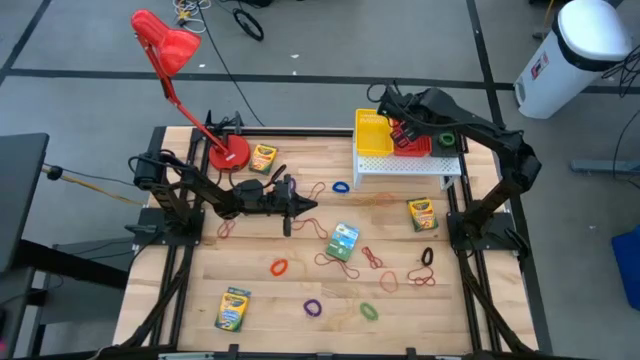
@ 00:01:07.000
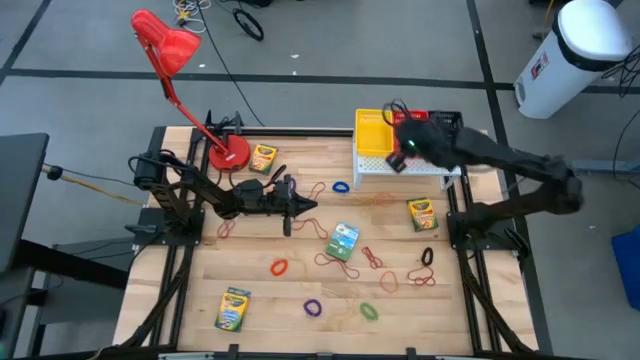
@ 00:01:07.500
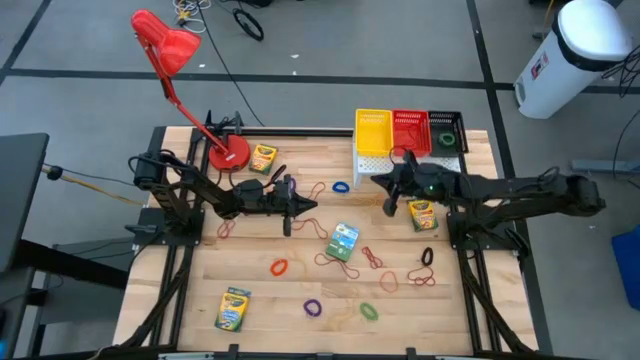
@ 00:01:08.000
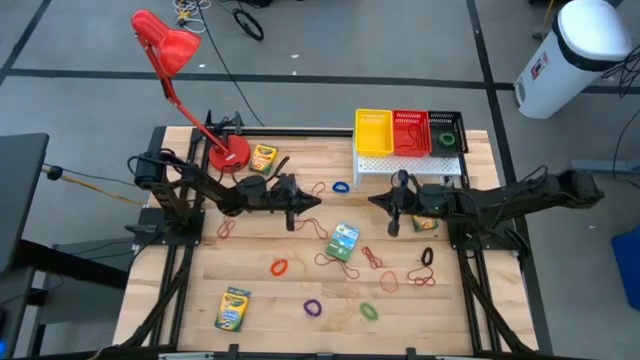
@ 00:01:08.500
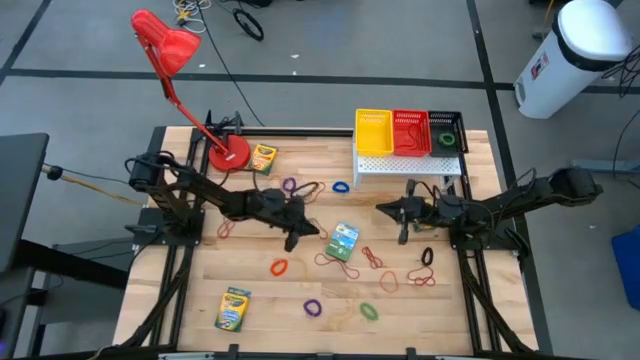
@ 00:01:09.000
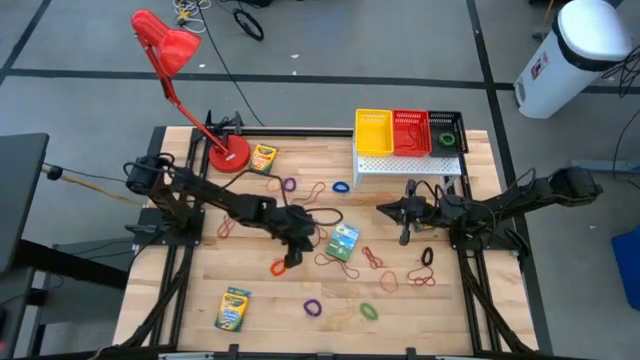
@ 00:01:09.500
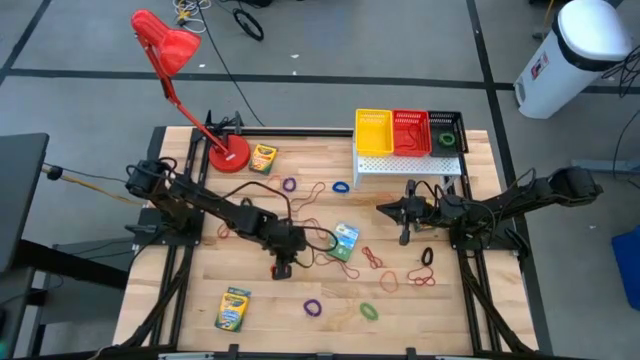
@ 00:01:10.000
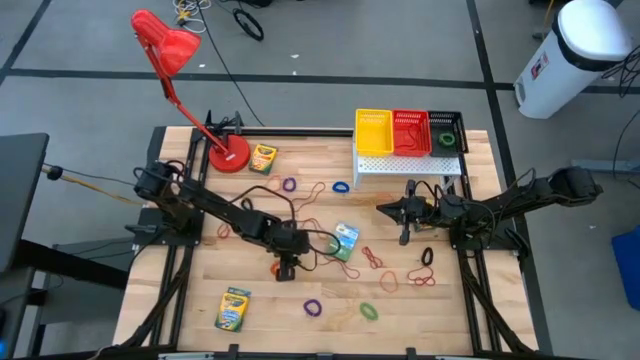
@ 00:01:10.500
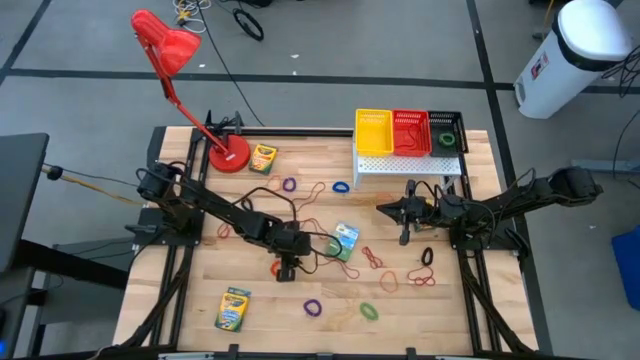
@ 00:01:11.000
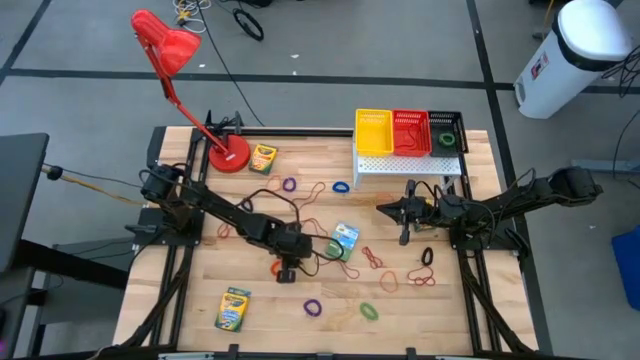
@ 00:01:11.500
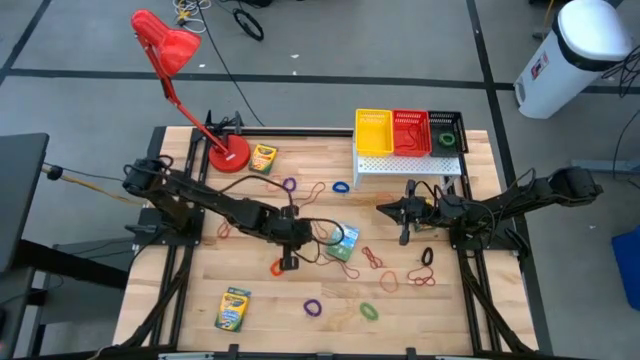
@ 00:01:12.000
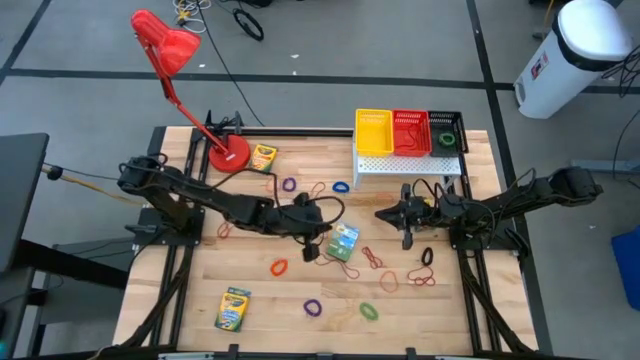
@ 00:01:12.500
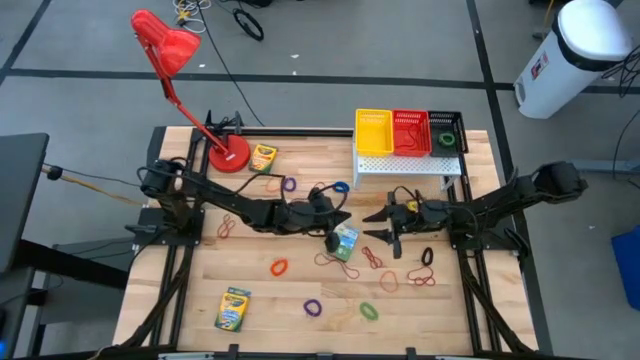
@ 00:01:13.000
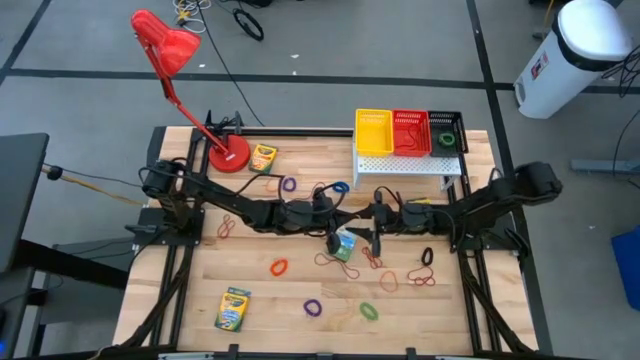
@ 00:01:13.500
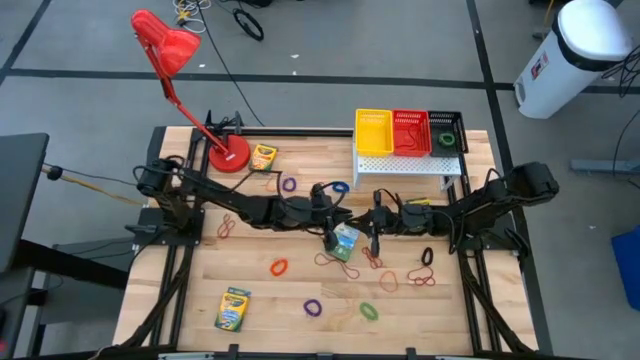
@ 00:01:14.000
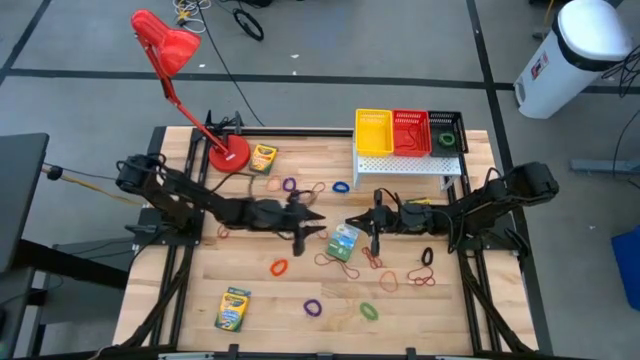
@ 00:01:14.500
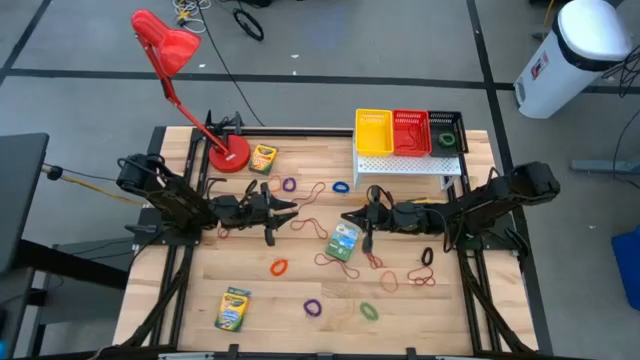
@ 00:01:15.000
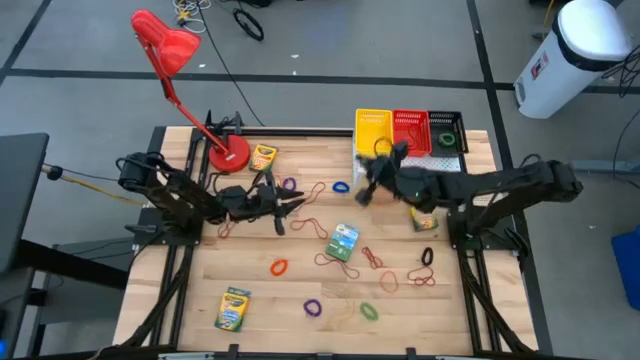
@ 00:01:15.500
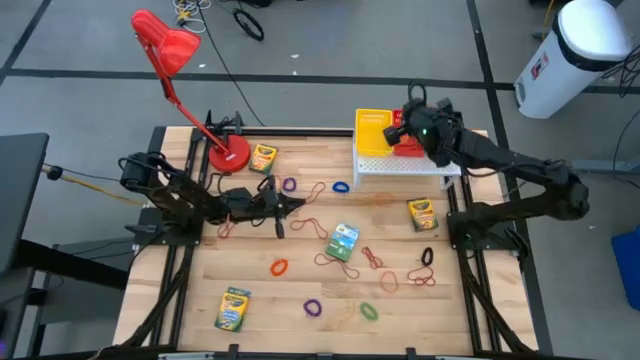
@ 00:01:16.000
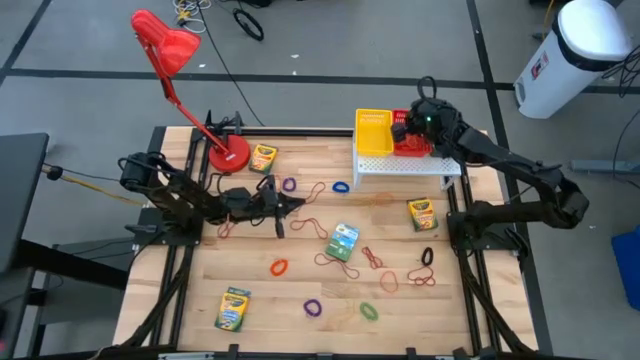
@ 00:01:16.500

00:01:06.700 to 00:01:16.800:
Task: Pick & Place Office Desk Supplies
Put the yellow rubber band on the red basket

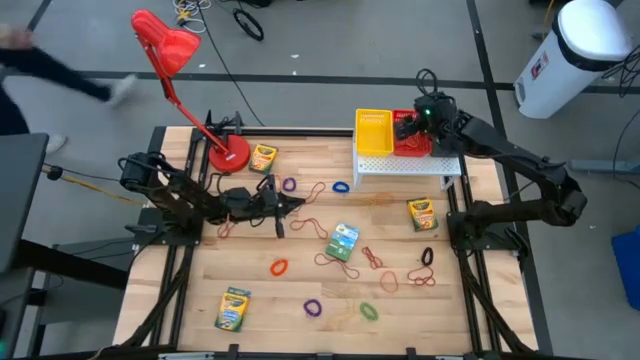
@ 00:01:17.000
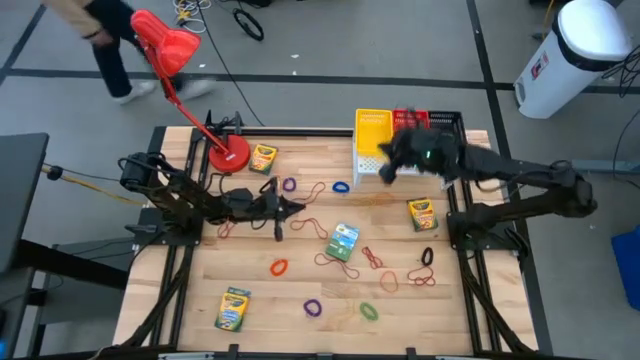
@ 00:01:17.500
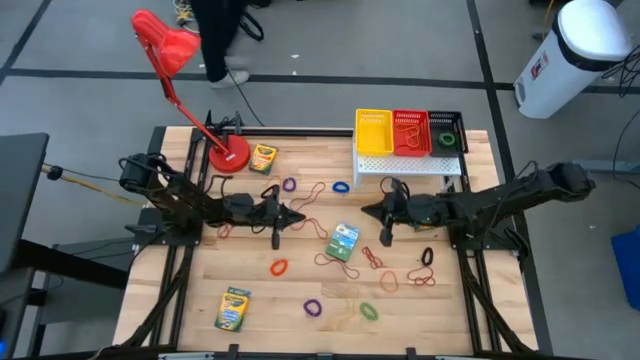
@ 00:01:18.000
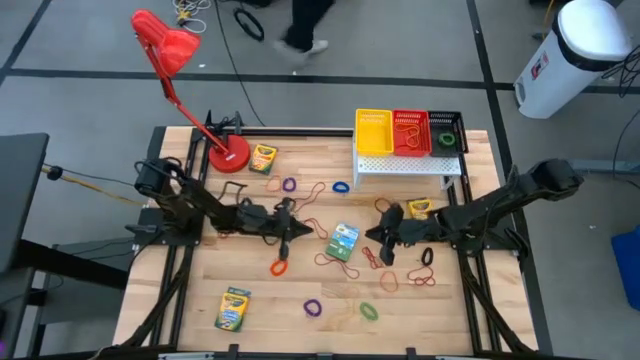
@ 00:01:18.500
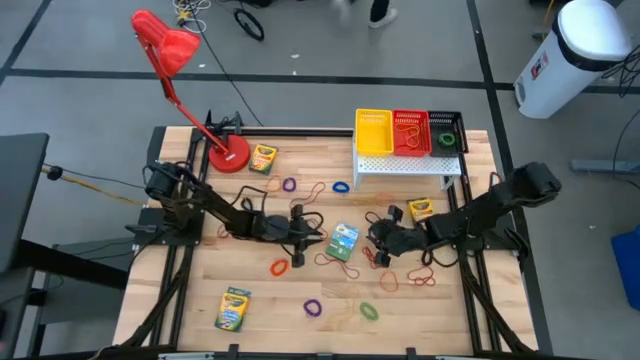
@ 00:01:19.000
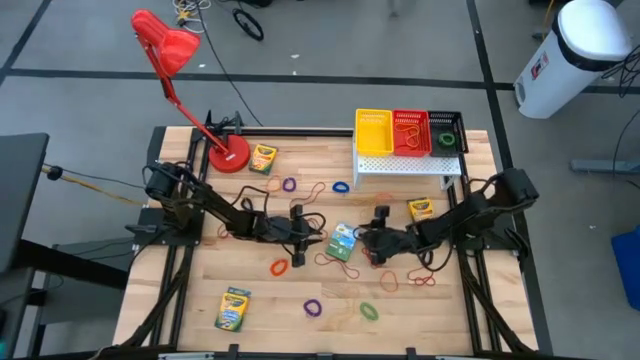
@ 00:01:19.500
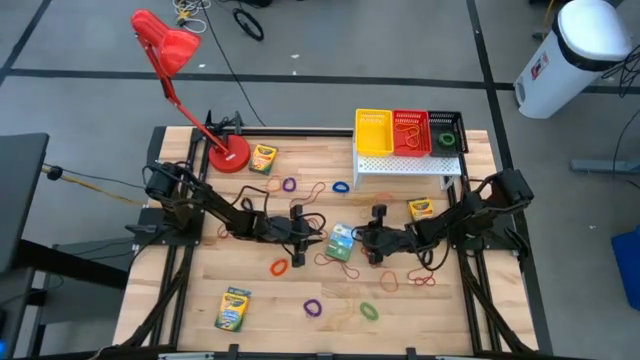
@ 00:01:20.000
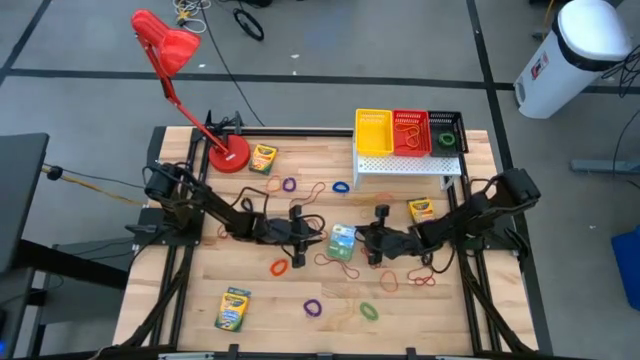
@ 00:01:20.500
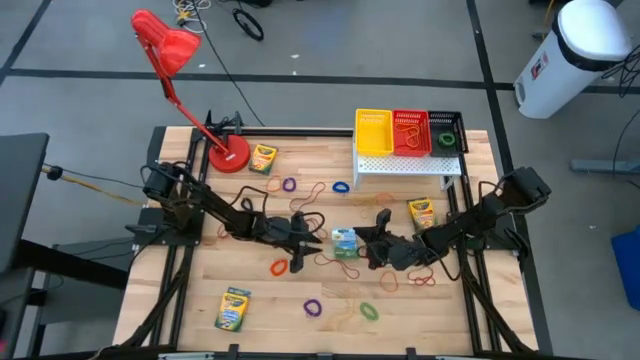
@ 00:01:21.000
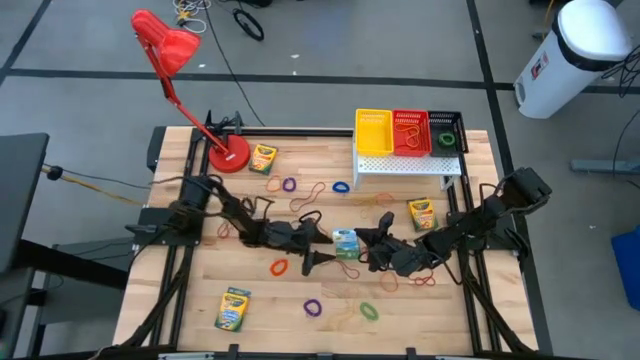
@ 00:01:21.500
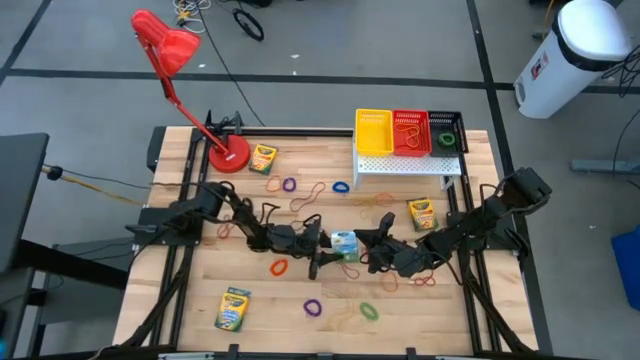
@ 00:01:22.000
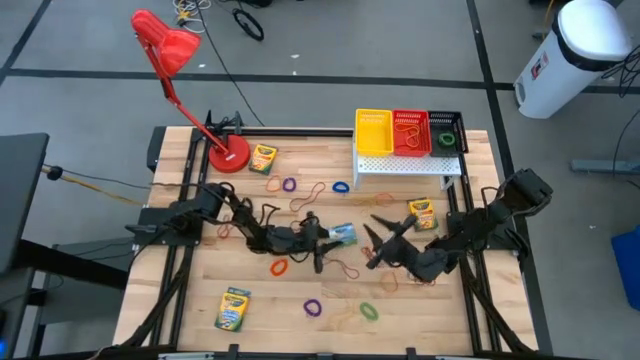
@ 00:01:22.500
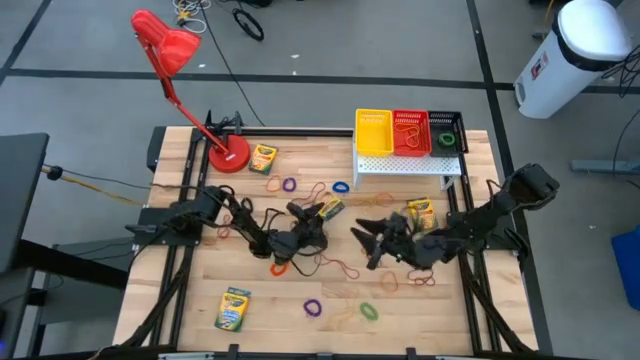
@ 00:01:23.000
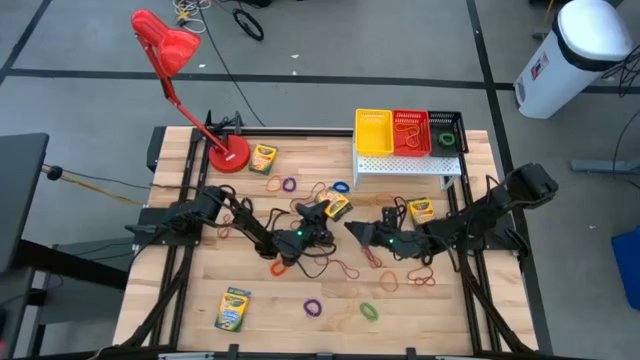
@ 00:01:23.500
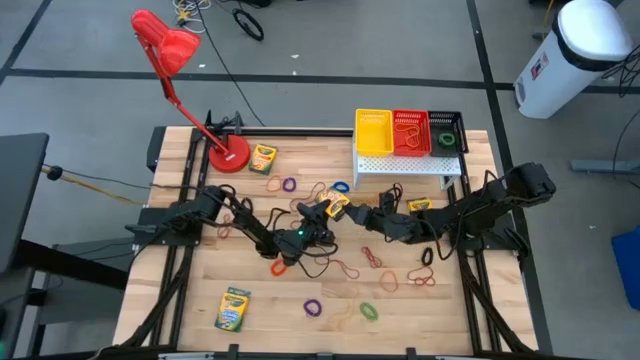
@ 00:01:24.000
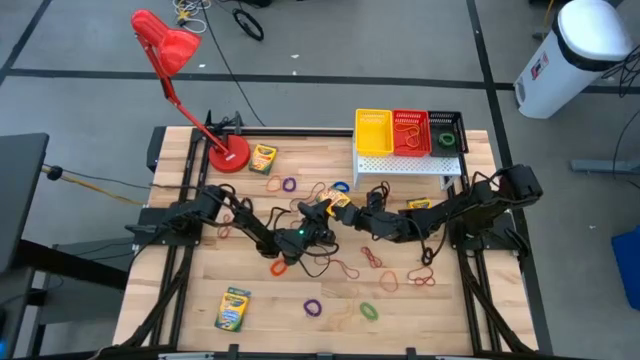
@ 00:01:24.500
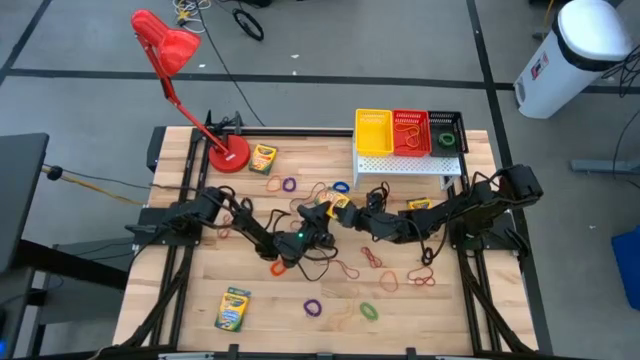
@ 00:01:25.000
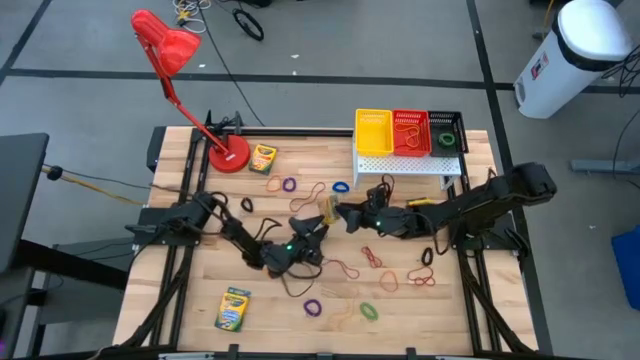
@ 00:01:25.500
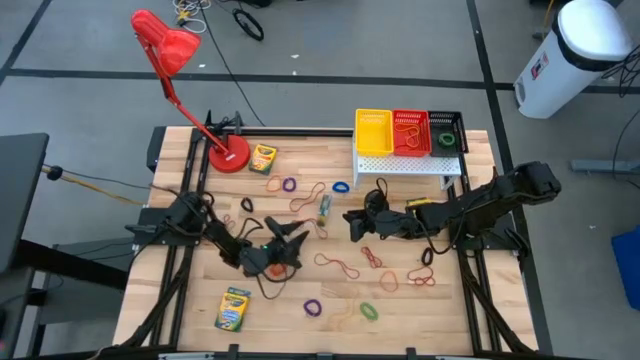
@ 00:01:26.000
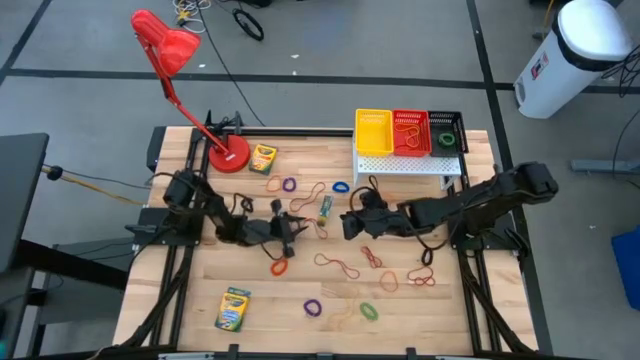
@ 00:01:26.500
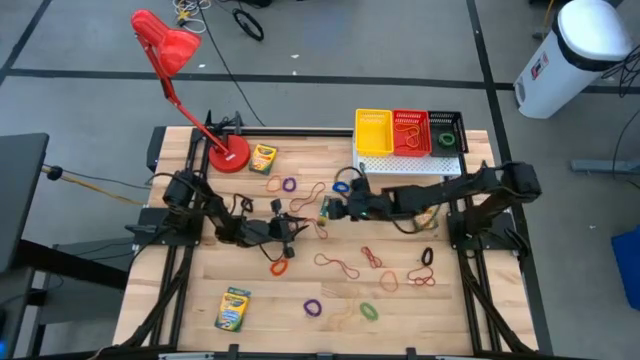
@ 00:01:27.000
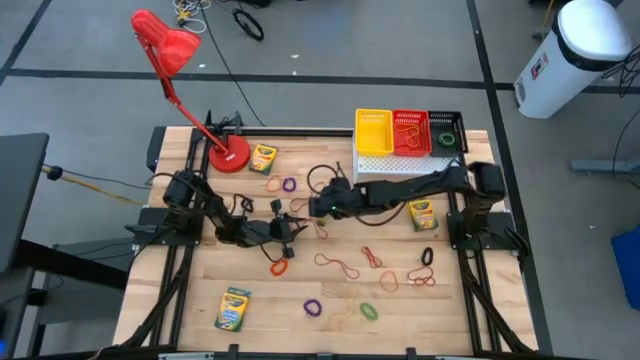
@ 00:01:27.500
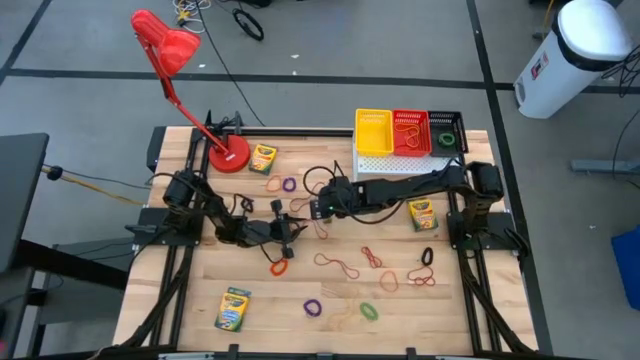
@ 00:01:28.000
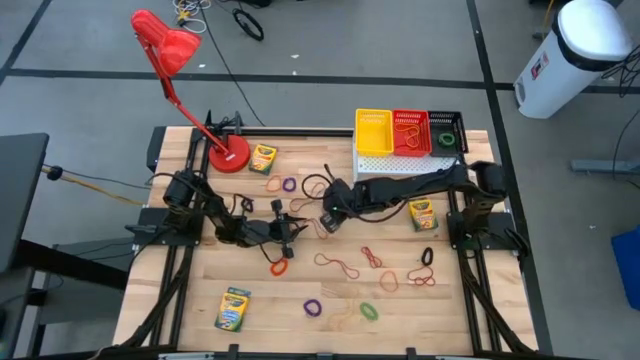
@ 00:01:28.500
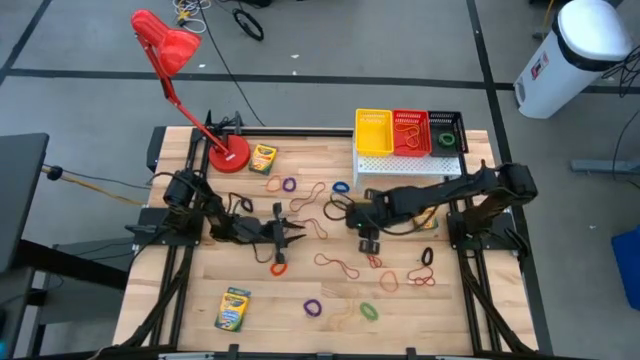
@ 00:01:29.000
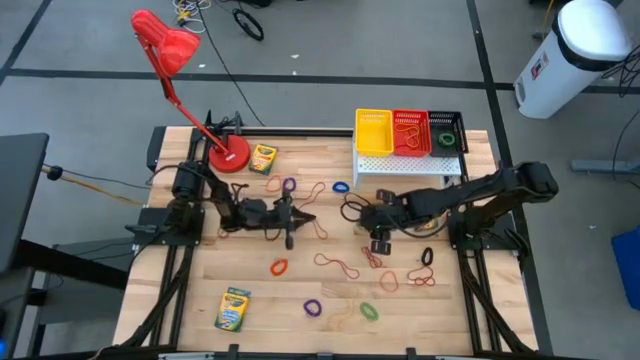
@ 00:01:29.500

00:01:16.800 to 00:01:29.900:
Put the yellow crayon box on the yellow basket
